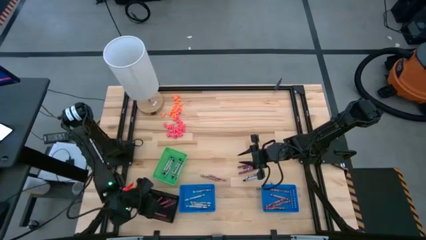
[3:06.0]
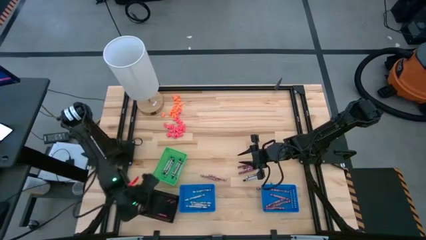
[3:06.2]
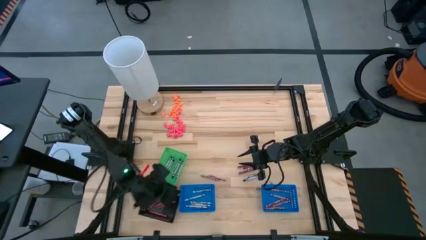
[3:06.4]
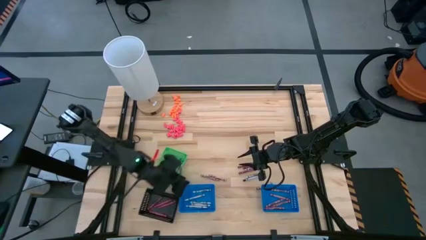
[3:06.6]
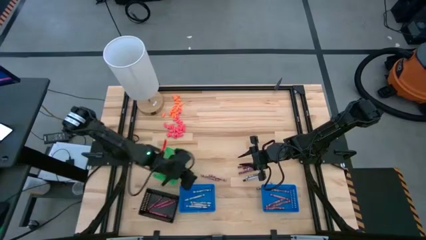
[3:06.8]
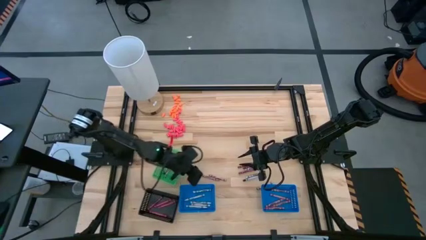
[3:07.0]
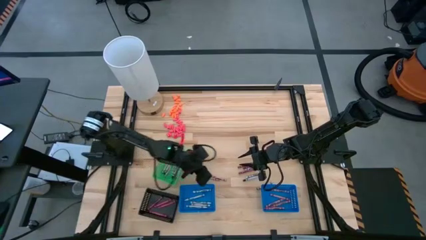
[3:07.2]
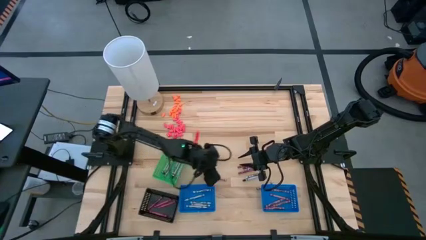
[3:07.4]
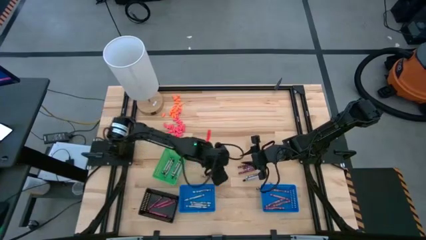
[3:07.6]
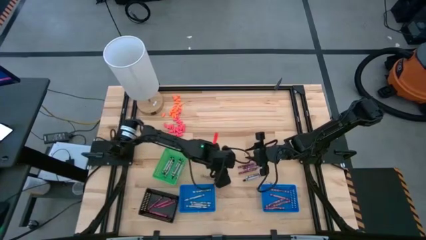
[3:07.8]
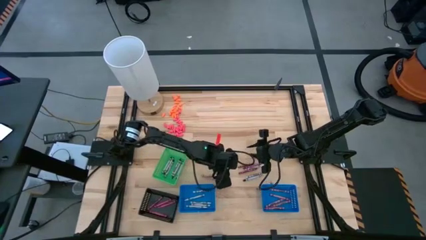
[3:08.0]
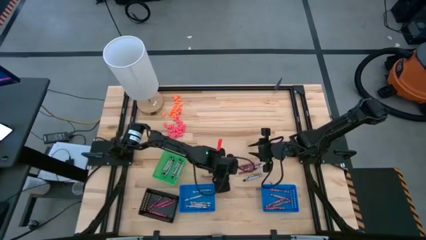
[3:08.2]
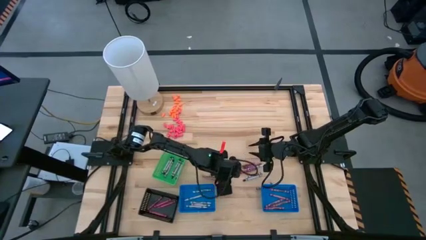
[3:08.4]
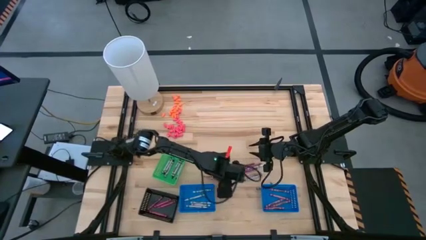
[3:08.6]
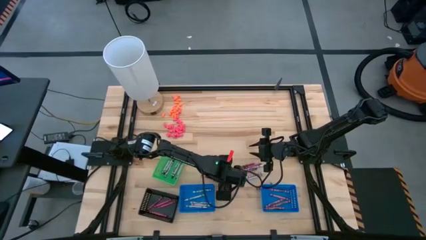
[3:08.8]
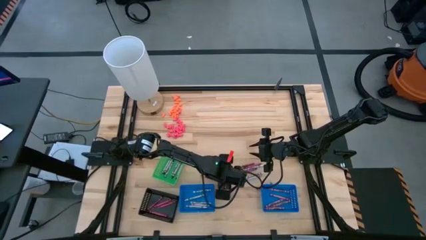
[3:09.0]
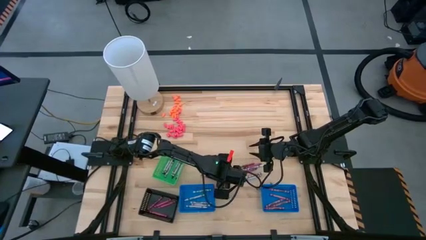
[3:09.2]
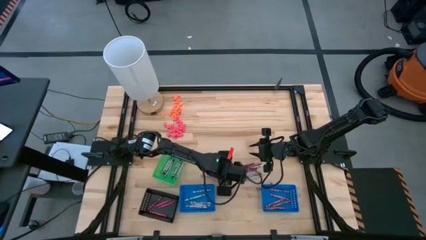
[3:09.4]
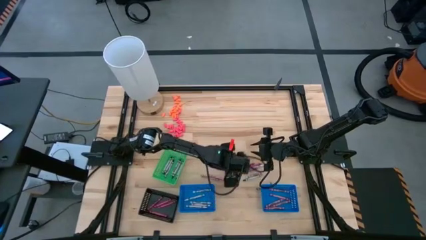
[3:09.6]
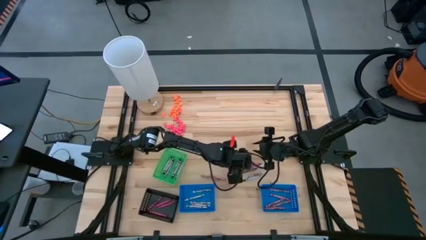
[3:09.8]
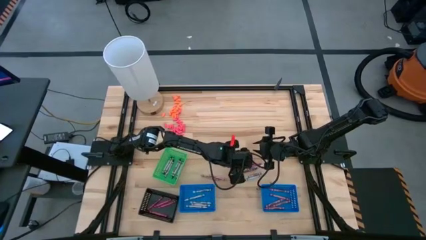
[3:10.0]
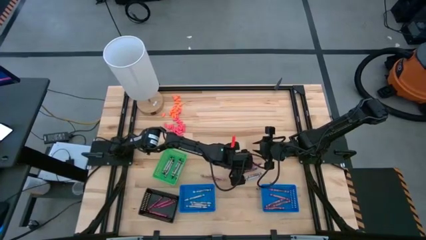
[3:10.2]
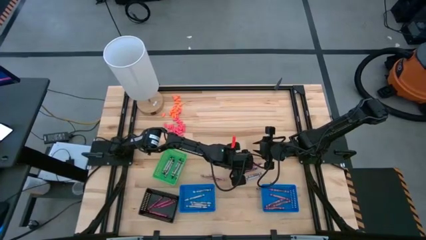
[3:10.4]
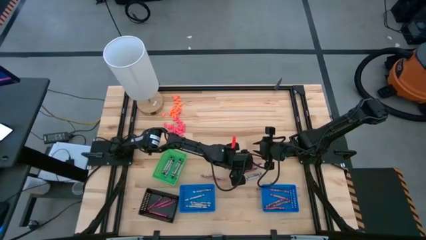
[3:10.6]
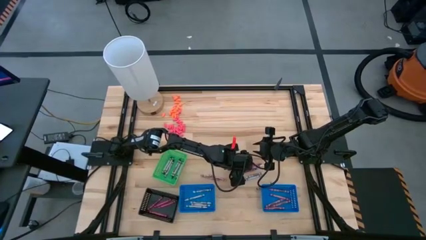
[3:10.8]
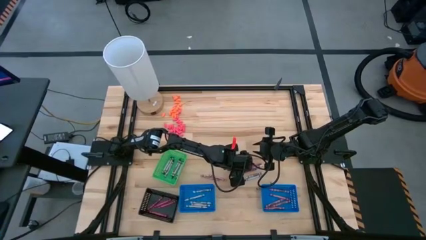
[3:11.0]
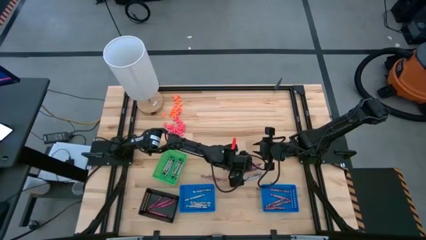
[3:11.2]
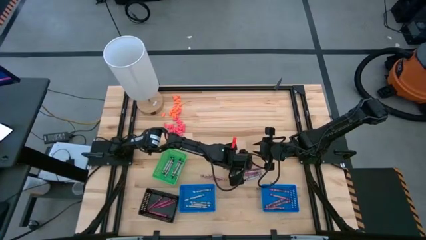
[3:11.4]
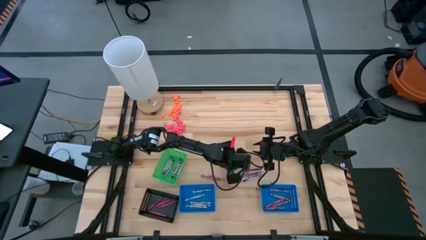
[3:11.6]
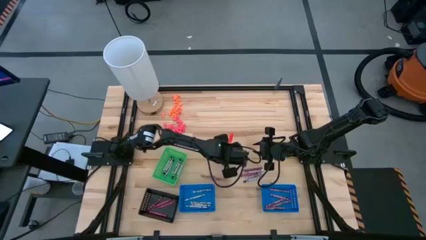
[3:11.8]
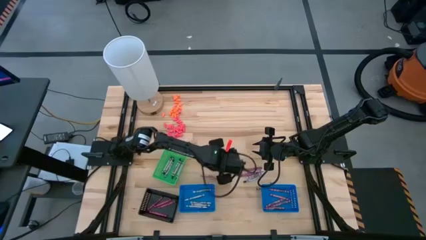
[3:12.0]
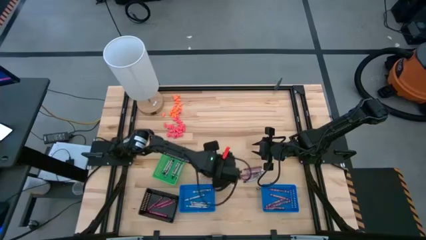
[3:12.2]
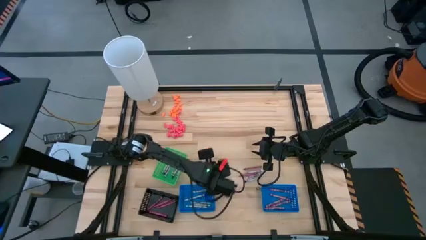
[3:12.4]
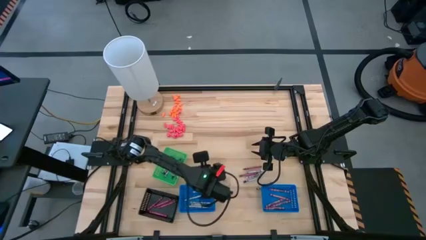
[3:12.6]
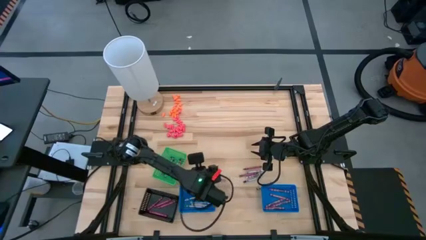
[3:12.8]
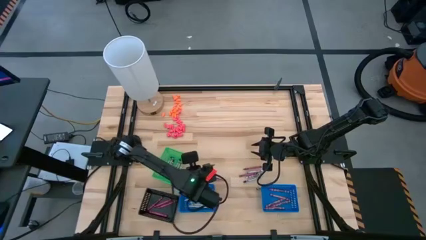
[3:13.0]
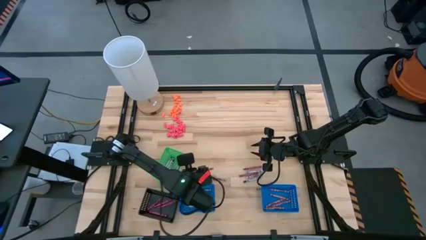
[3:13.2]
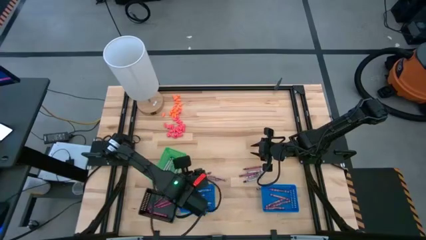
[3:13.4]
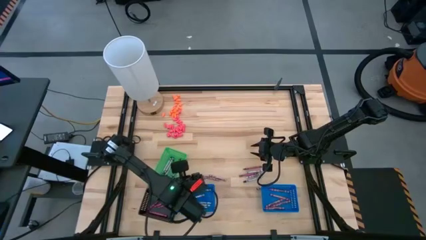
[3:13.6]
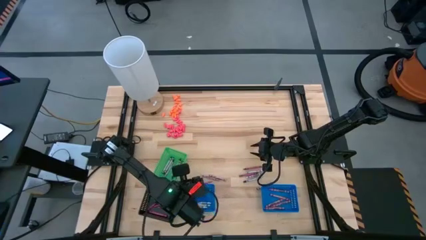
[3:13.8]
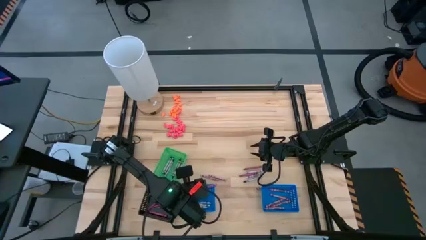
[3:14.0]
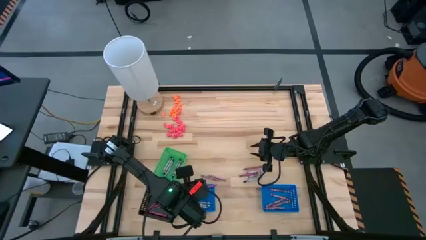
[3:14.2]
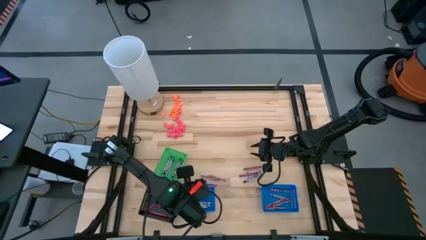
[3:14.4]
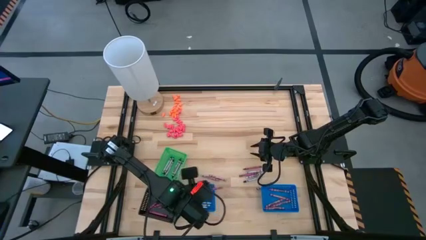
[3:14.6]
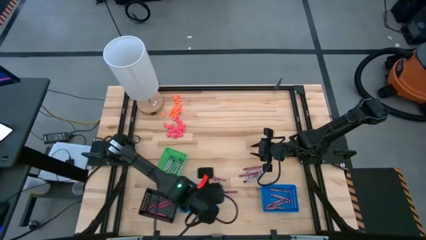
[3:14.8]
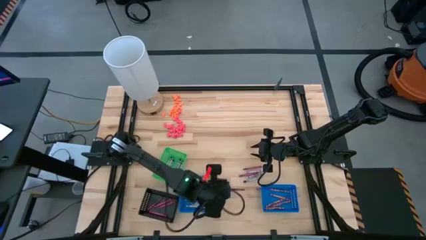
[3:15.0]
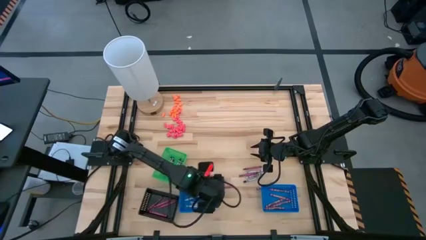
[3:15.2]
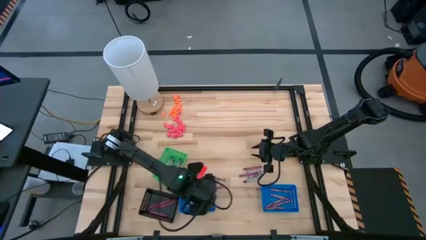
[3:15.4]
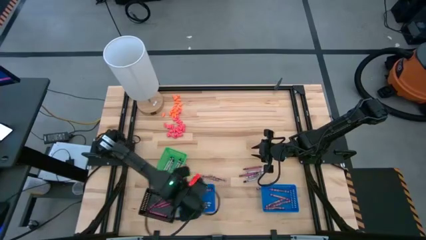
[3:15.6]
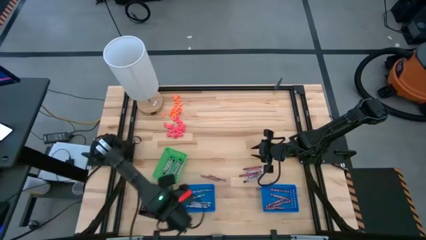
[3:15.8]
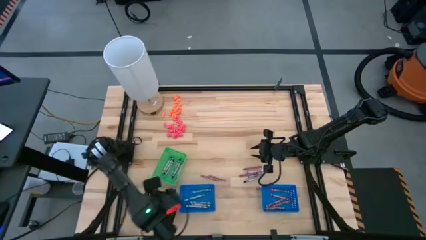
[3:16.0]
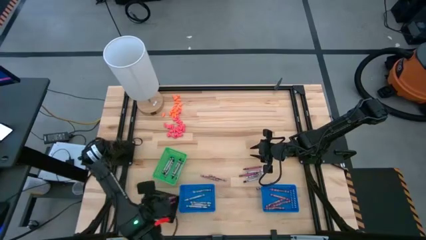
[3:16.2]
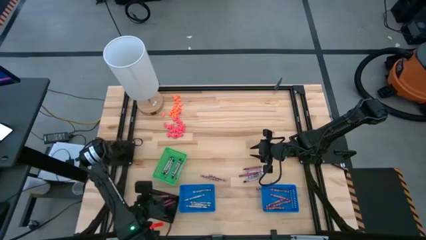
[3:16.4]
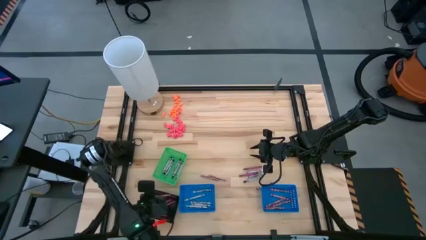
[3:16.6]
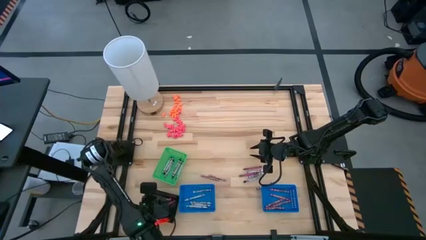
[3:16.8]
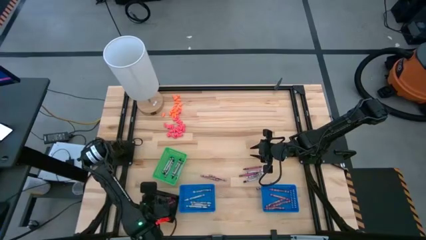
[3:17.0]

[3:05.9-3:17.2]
Task: Sort crayons
Put the red crayon into the black basket

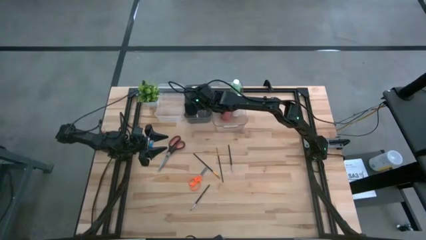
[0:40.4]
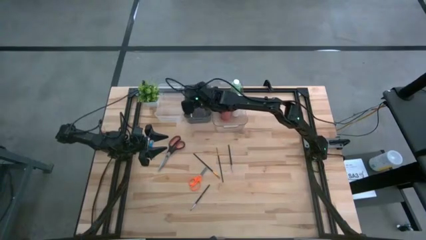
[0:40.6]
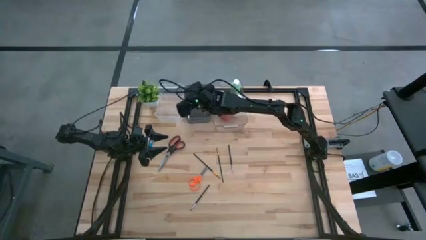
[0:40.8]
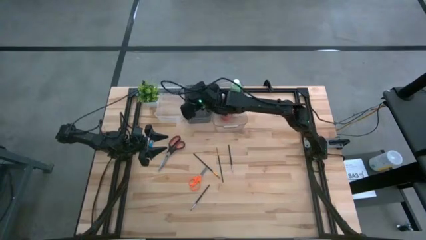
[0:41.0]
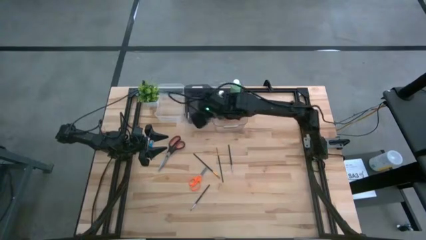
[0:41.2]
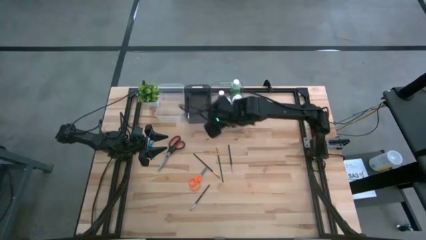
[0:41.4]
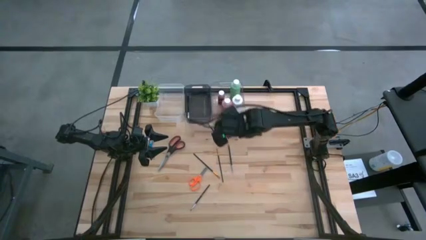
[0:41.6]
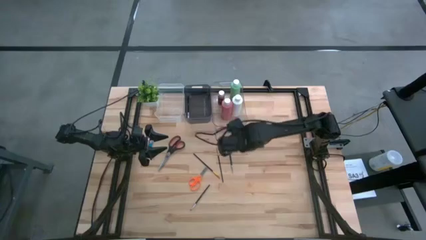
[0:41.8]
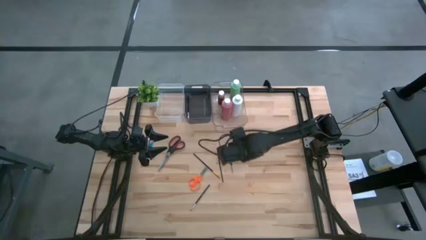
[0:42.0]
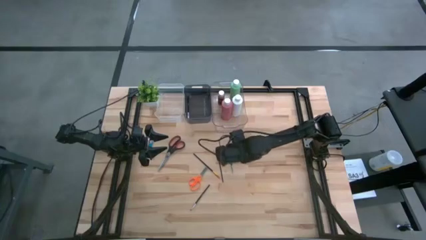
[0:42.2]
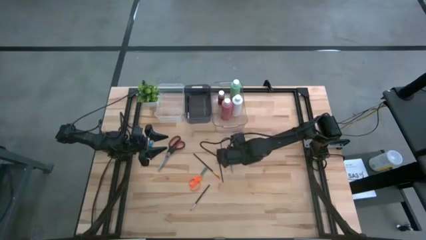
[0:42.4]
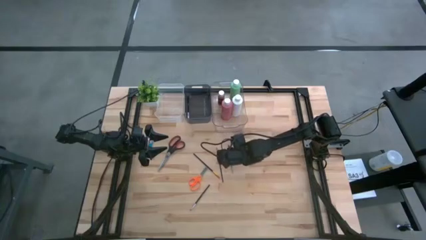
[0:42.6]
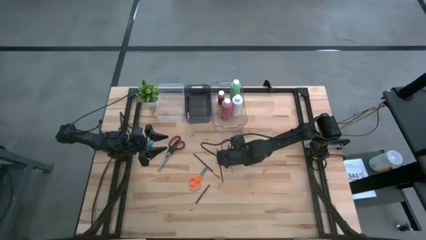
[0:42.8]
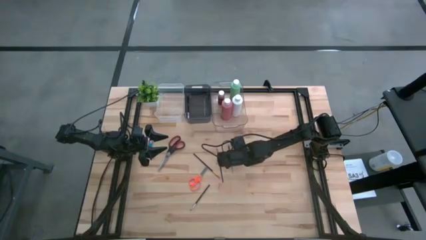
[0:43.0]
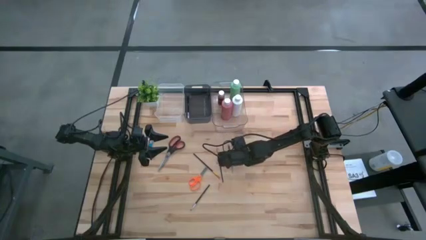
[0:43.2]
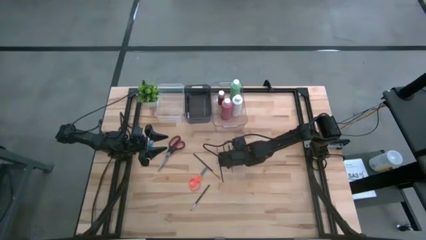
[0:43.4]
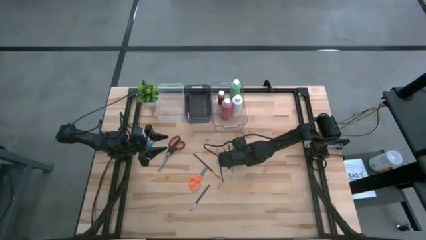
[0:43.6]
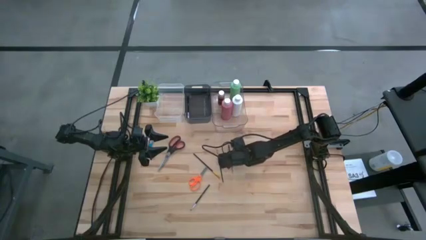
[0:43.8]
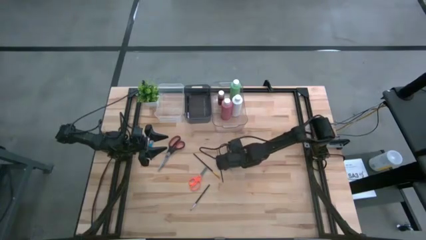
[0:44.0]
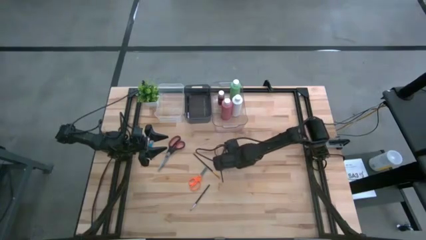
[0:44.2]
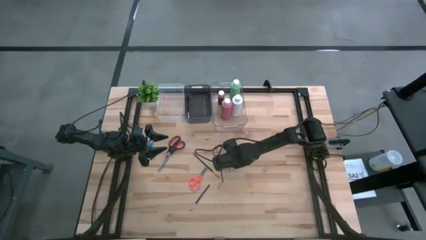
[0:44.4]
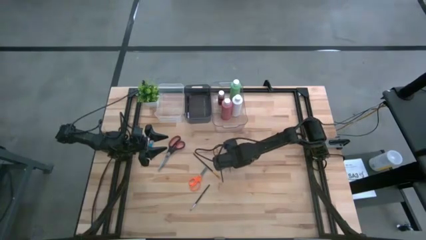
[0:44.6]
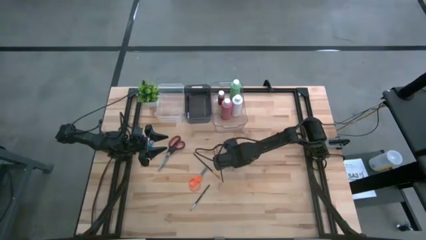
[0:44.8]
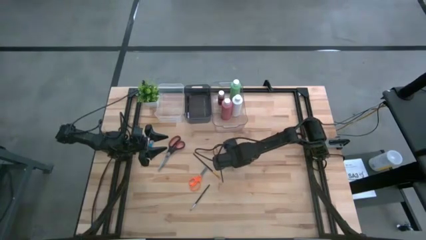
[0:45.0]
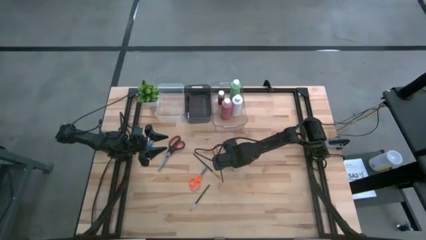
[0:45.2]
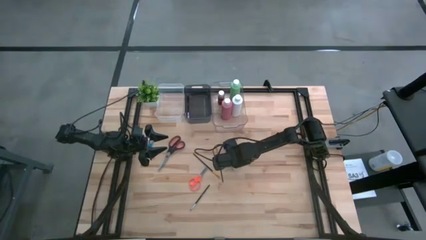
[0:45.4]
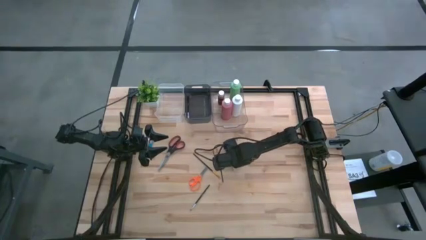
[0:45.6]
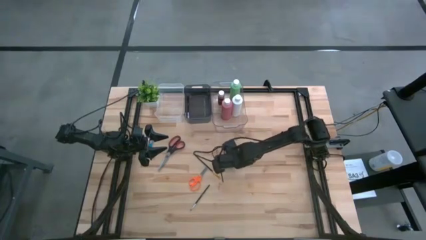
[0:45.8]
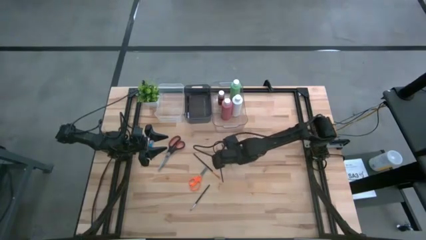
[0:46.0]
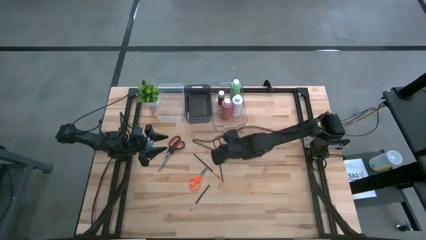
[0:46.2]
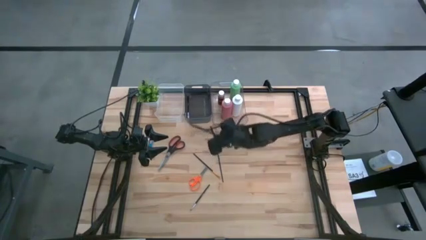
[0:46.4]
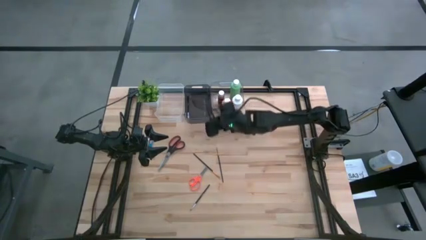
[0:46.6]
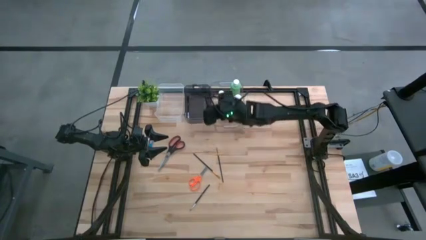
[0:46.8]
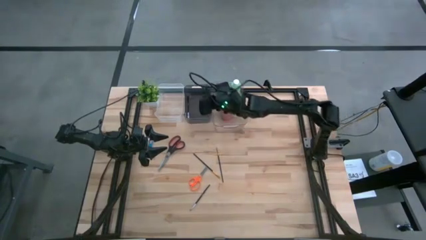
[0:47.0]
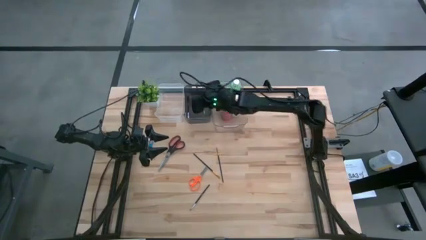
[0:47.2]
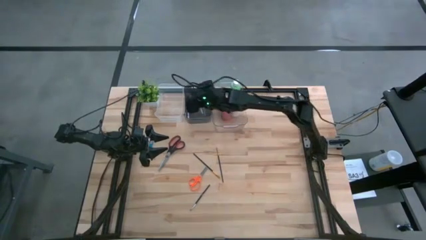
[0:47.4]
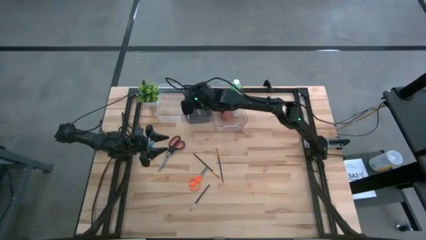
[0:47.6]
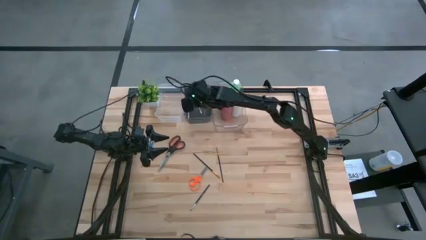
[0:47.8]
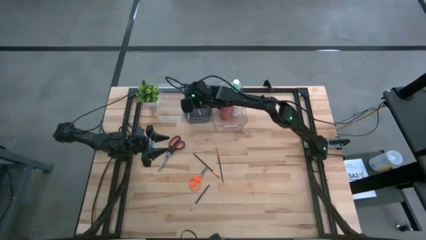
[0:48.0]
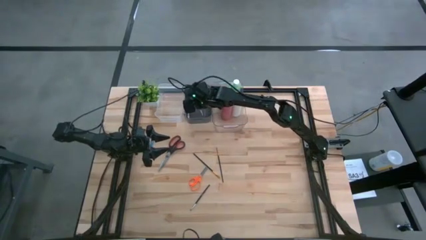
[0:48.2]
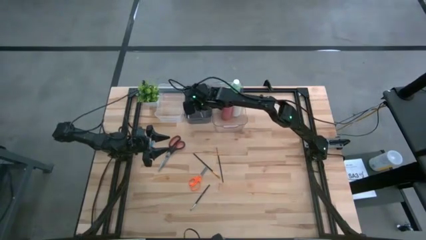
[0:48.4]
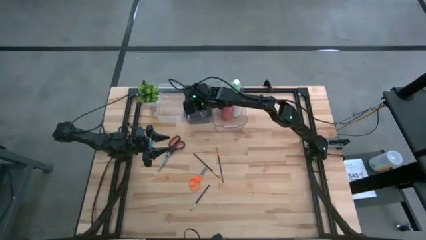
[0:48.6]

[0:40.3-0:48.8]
Task: Pick & Place Paint Supplies
Put the top silver paintbrush into the black bin
